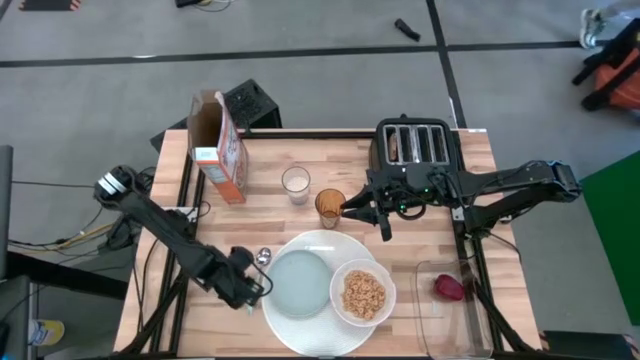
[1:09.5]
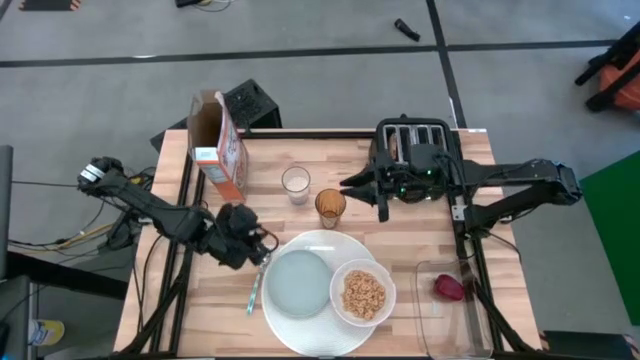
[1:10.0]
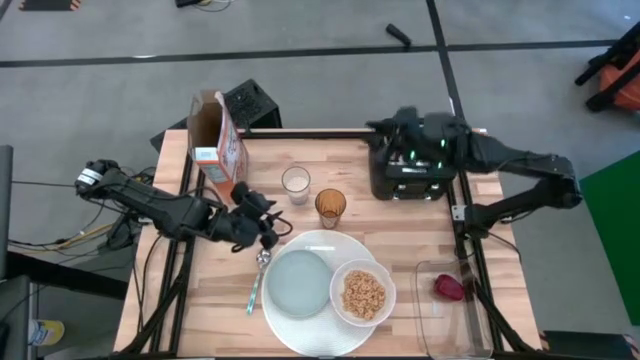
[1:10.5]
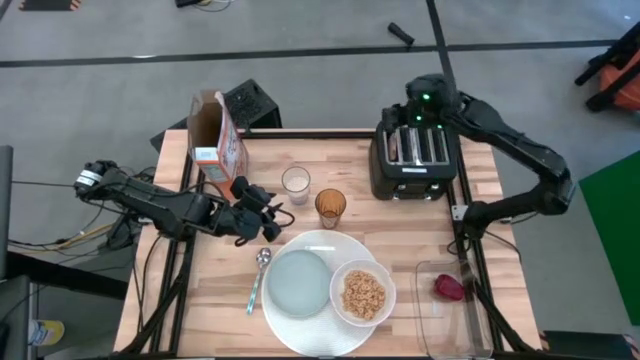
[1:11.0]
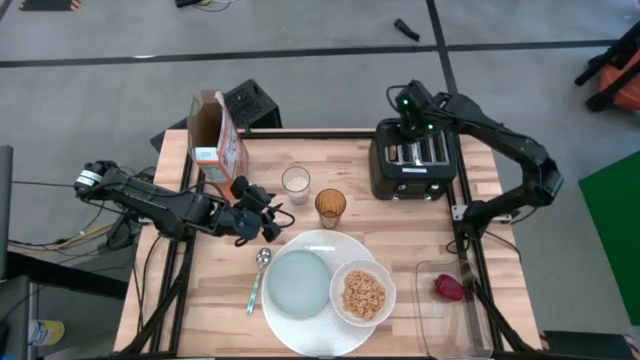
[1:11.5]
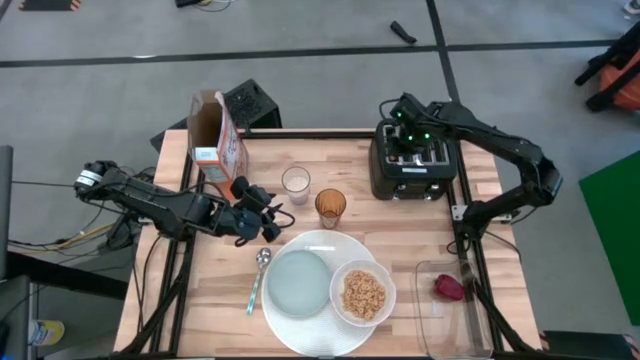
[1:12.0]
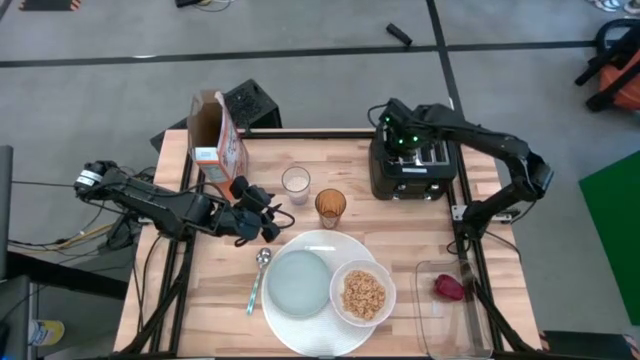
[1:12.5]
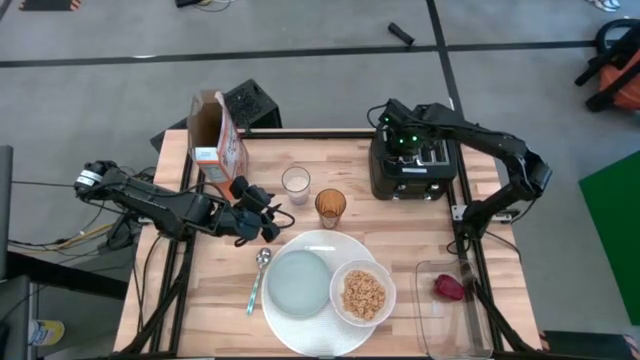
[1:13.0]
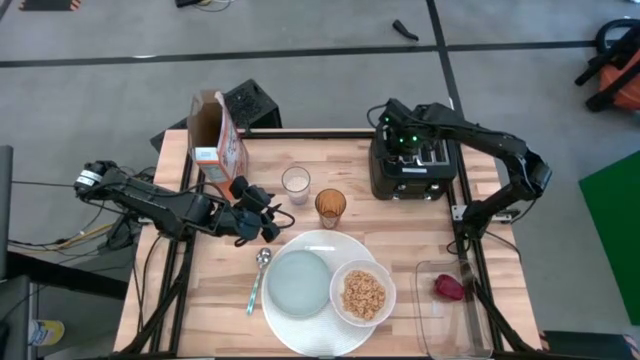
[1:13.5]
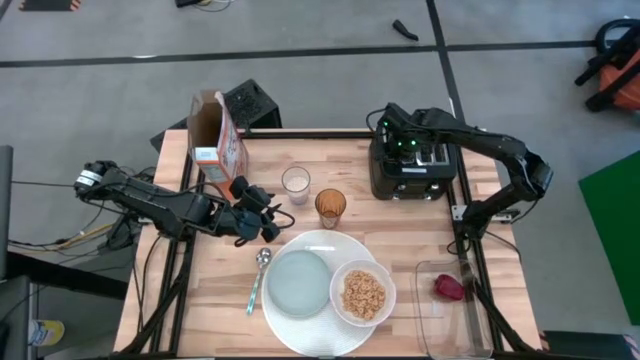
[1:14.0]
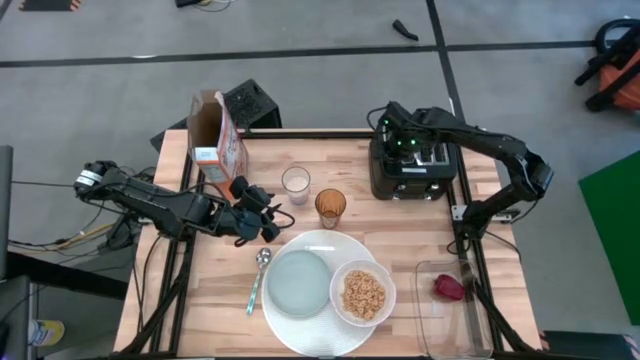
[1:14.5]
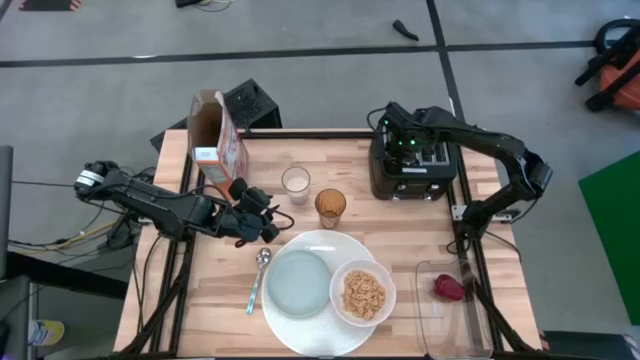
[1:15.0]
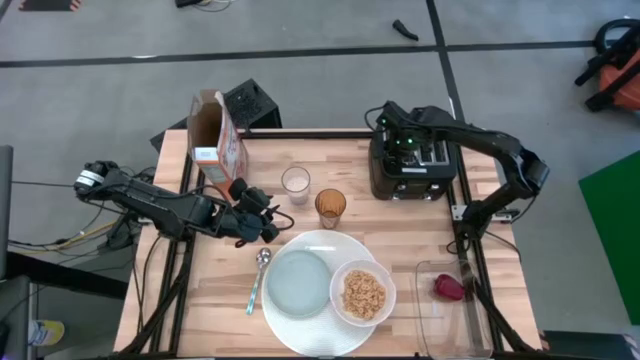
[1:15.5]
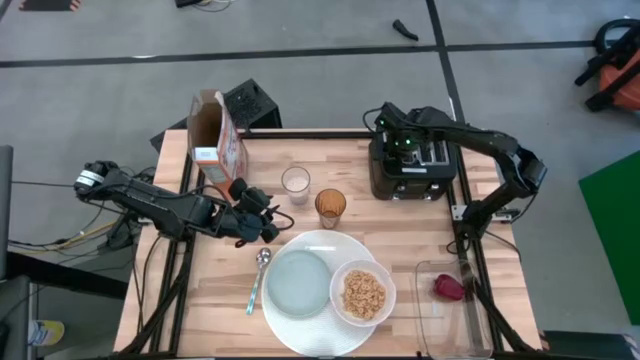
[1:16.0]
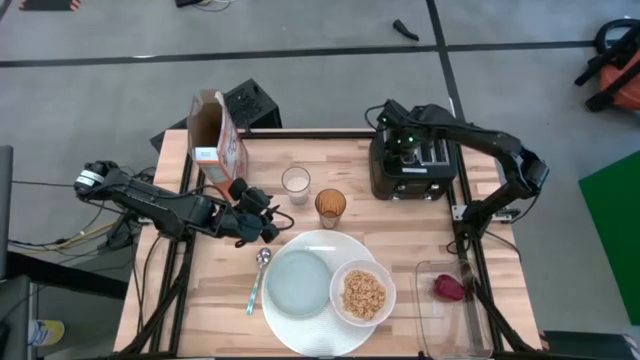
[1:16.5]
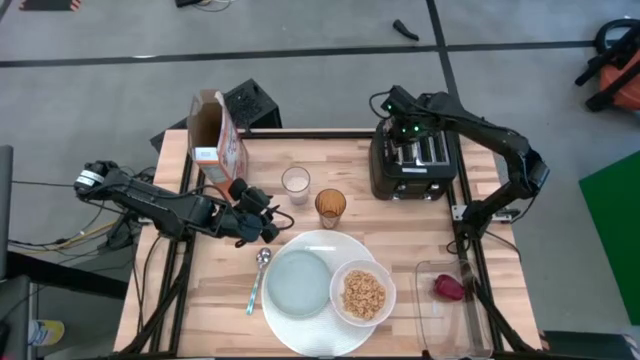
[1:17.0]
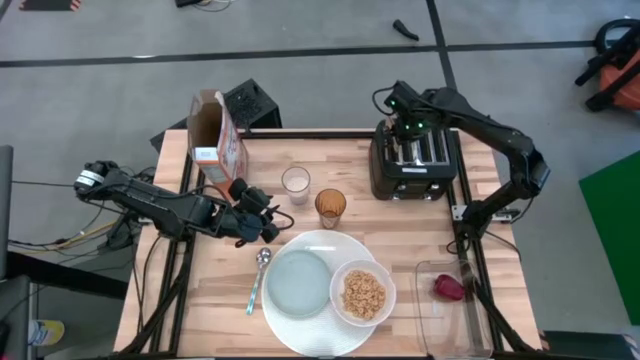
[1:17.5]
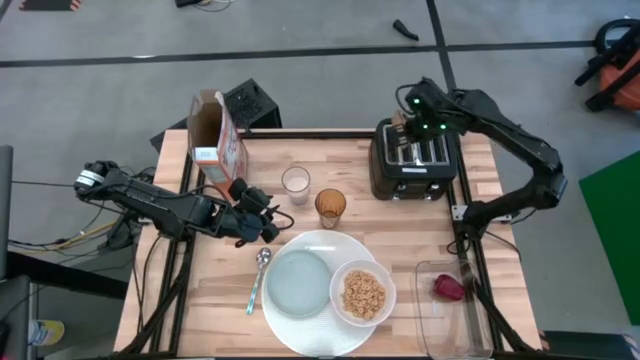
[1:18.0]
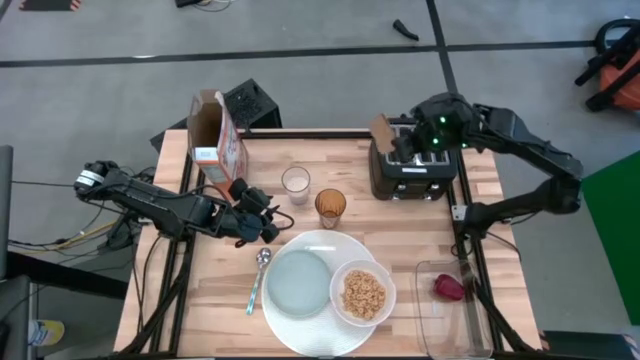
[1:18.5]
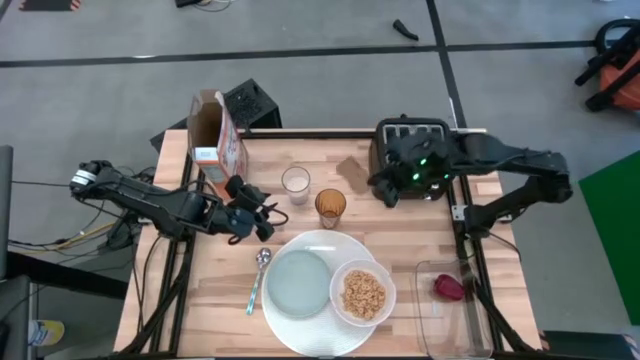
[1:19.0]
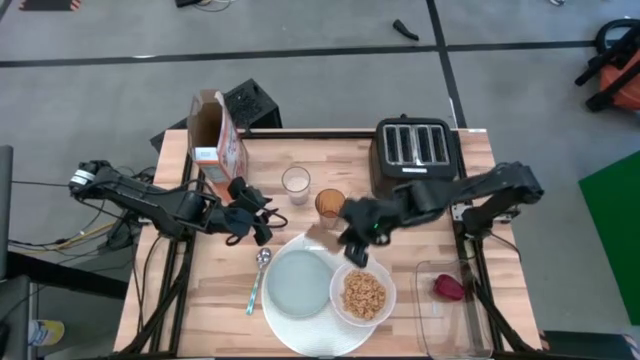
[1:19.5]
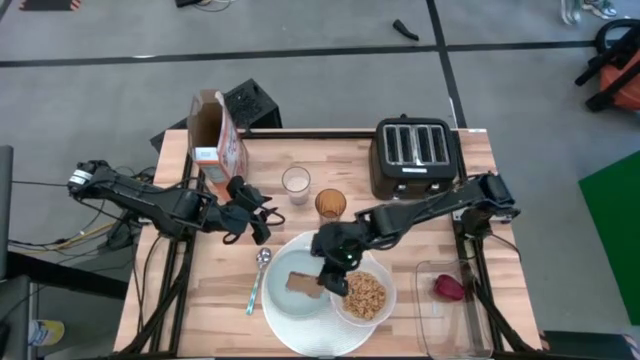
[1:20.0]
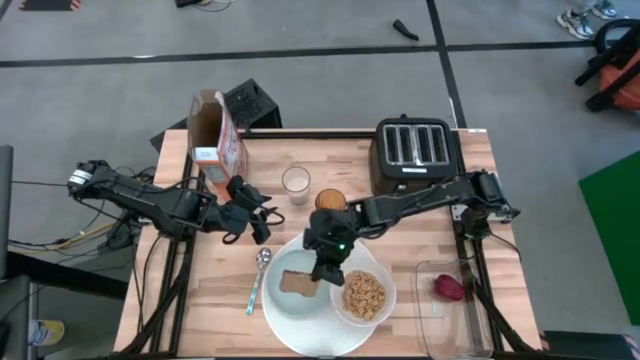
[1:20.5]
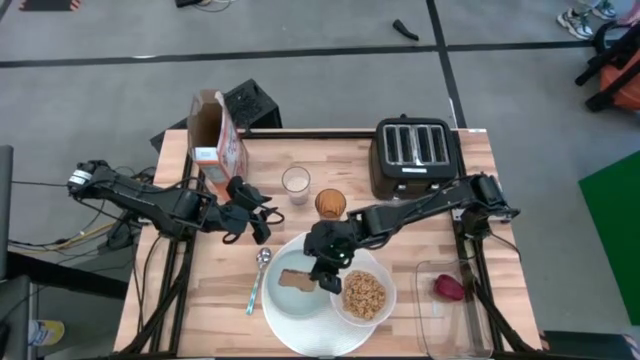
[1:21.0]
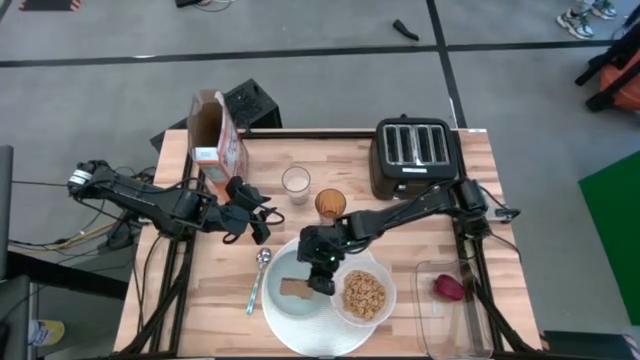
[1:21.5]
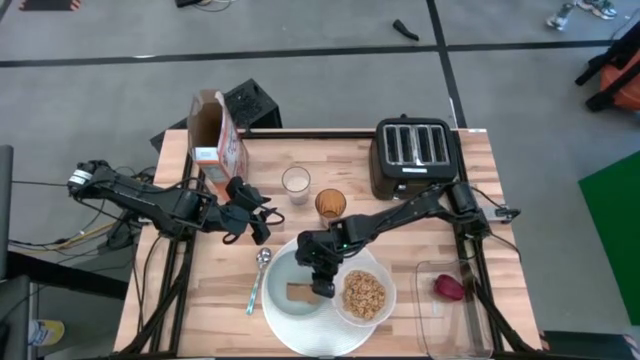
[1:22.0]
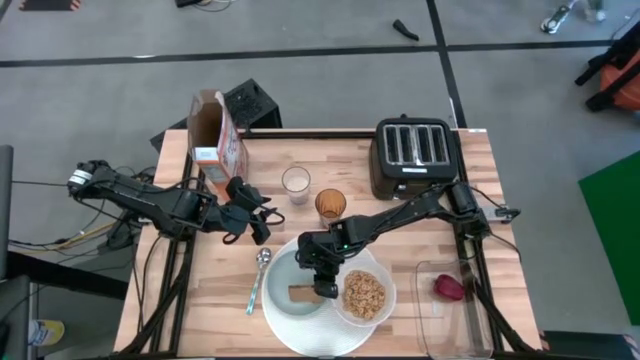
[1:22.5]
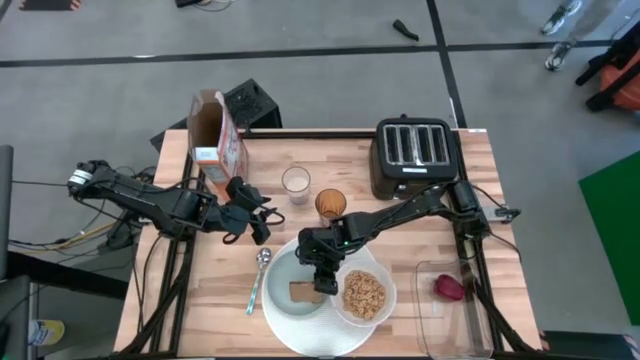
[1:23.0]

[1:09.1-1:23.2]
Task: Arrange a breakfast setting
Put the toasted bread on the gray plate

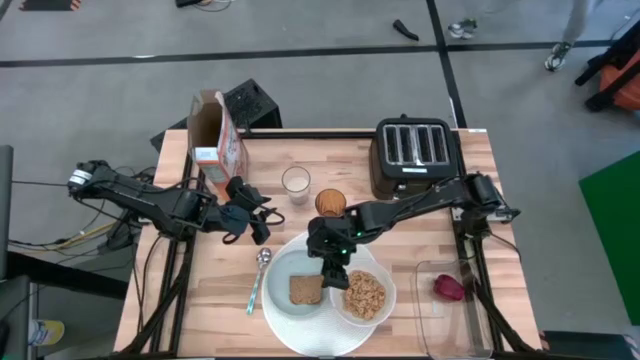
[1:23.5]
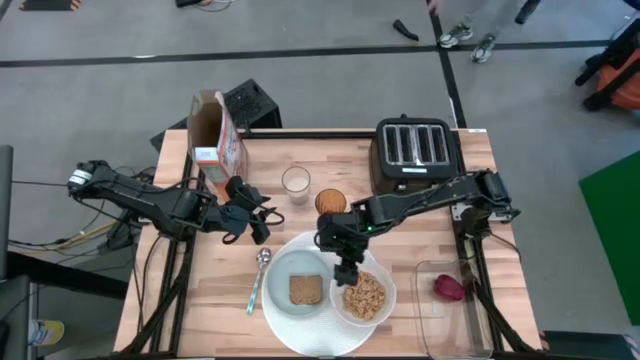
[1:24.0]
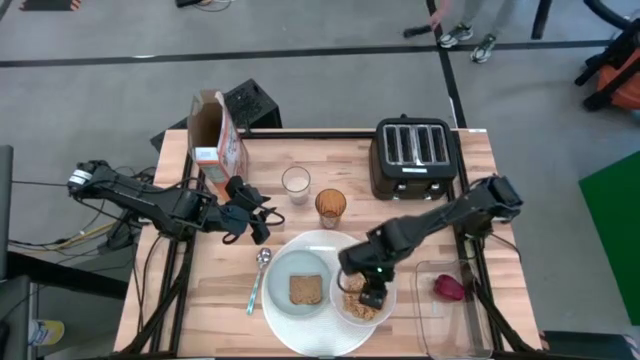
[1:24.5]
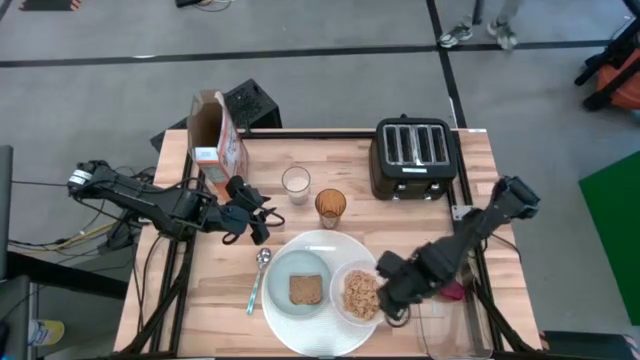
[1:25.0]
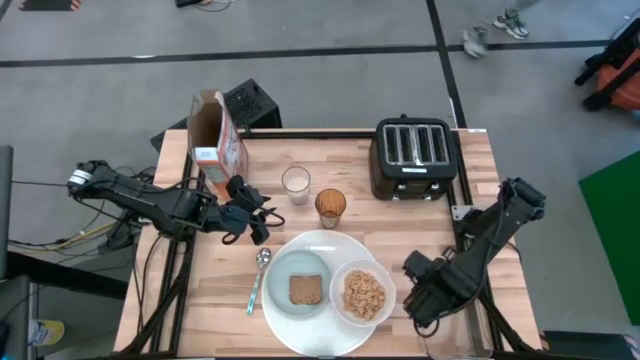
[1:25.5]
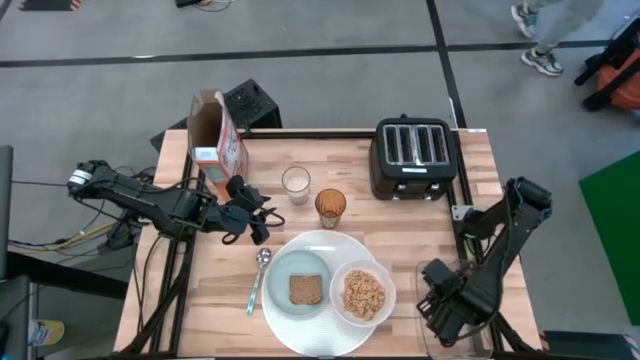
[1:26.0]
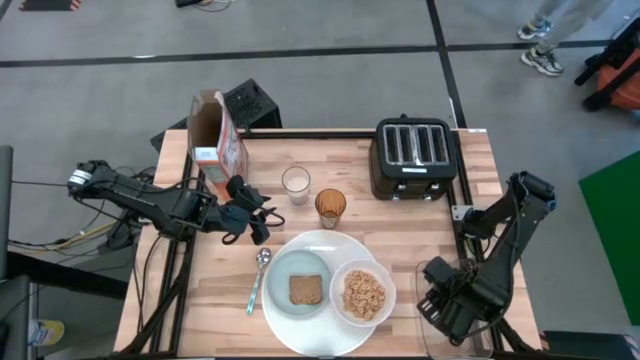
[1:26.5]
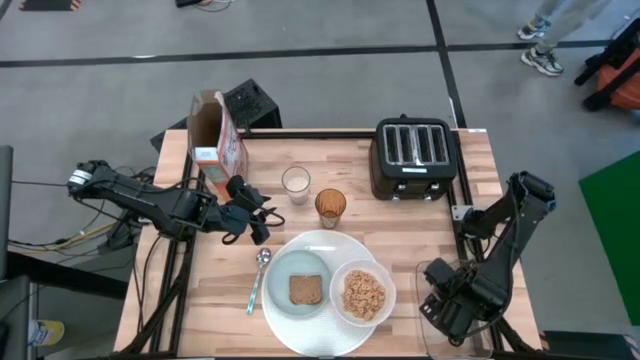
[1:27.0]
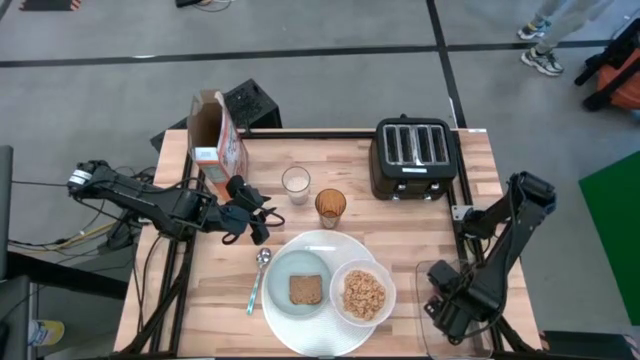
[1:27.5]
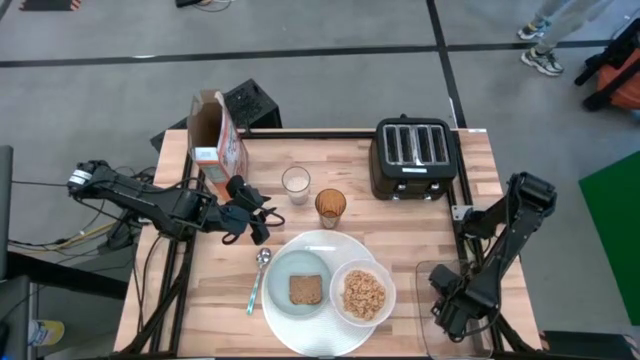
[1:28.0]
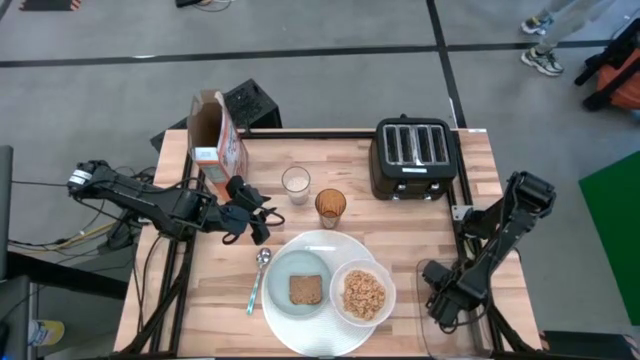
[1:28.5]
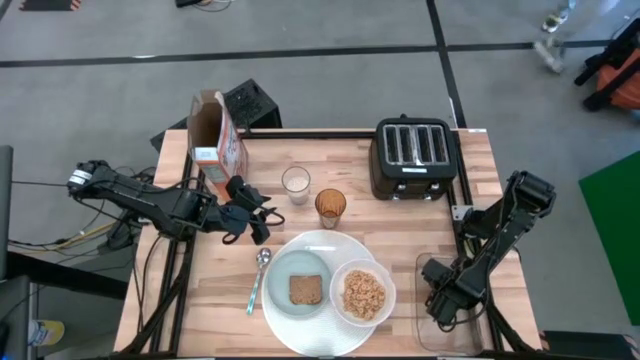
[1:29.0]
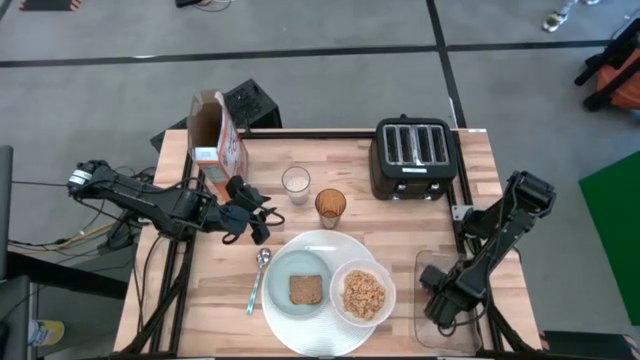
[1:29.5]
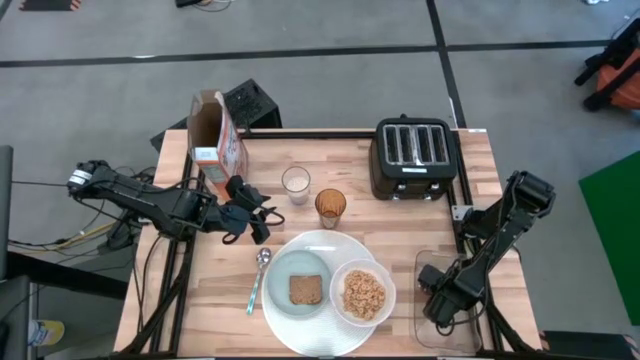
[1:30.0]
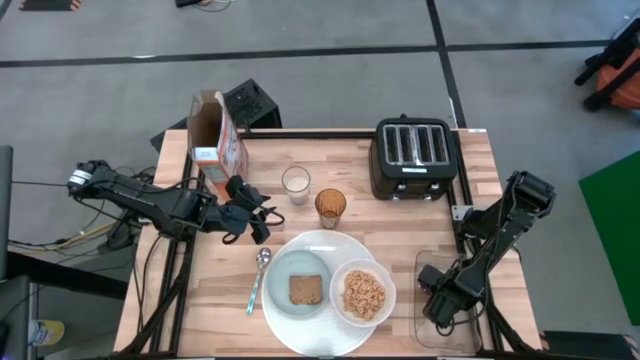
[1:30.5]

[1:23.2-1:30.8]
Put the red apple on the gray plate

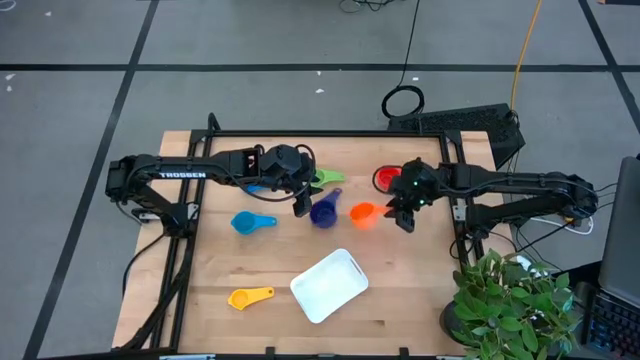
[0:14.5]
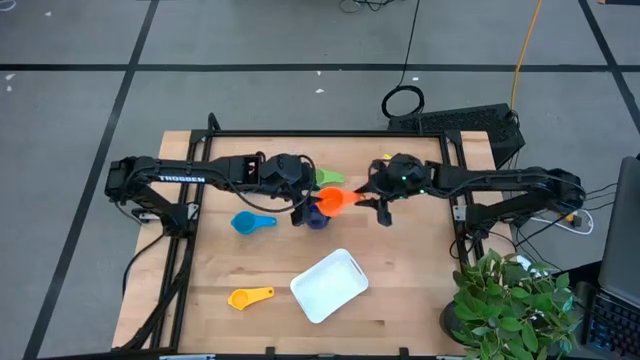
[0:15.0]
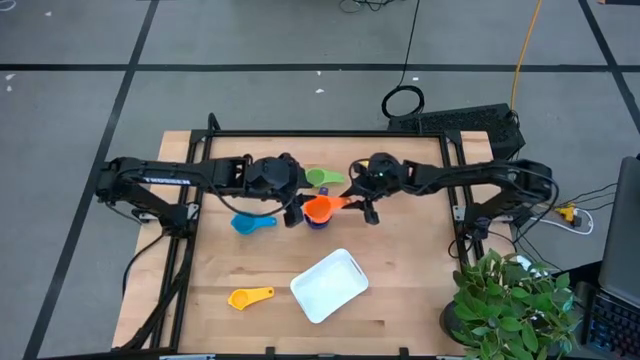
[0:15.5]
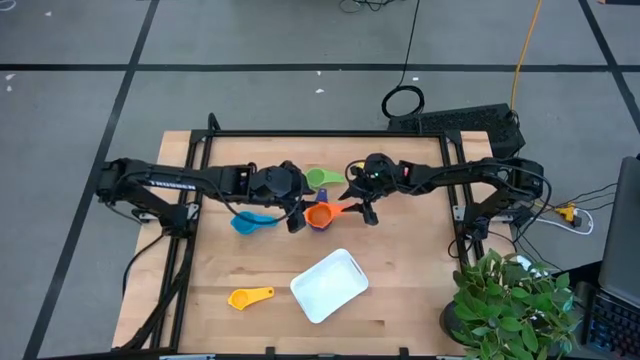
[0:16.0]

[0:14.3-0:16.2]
Task: Nest measuring cups in basket
Stack the orange measuring cup on top of the dark blue measuring cup
